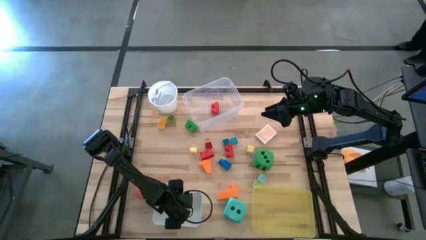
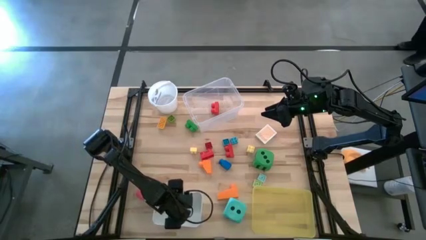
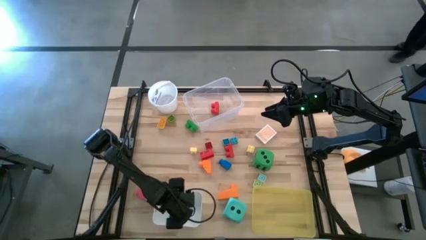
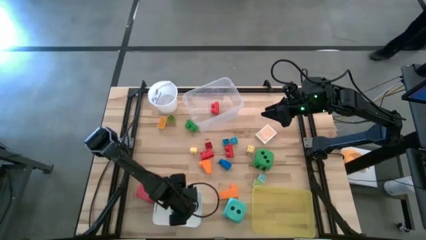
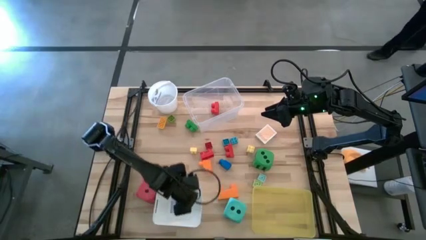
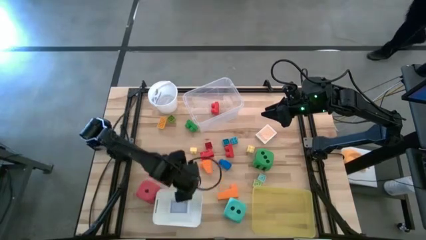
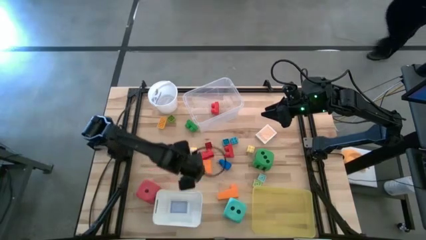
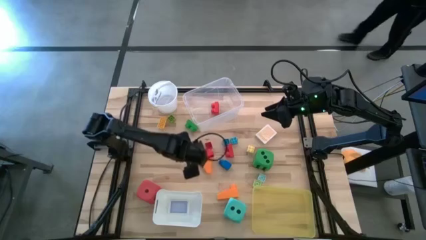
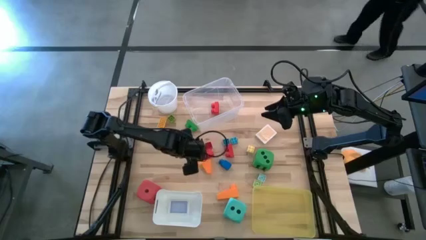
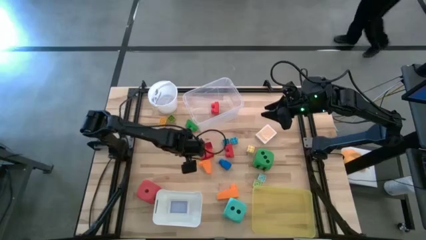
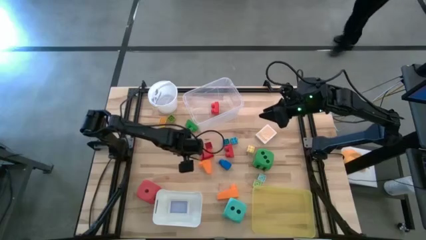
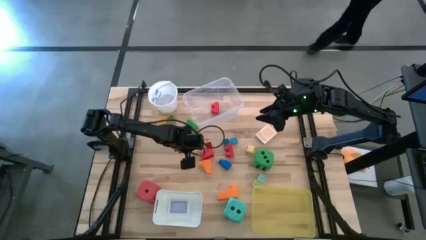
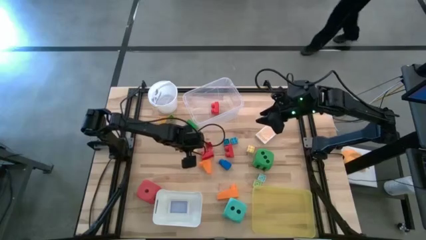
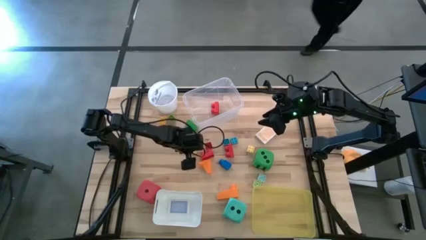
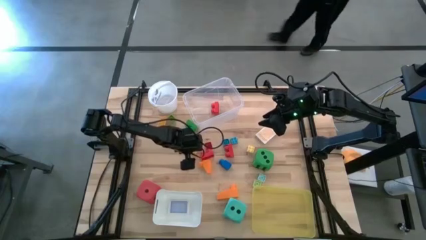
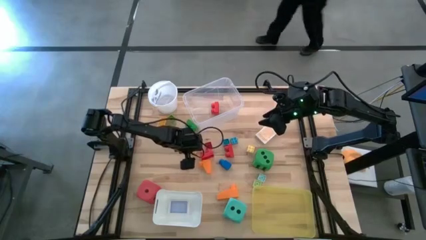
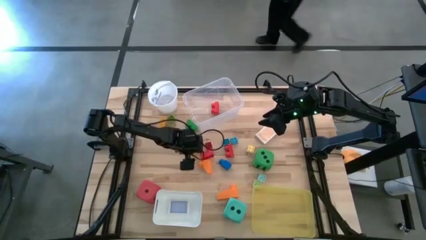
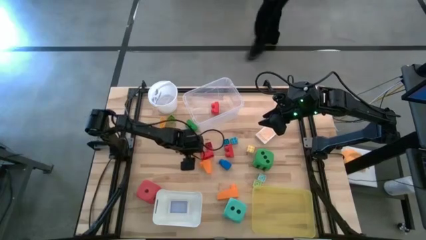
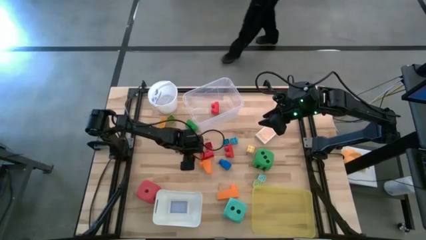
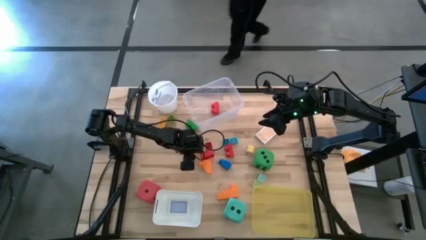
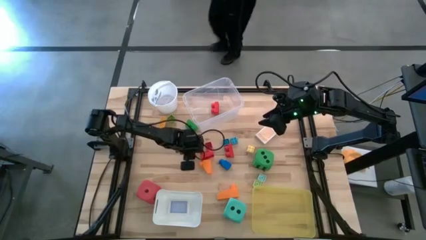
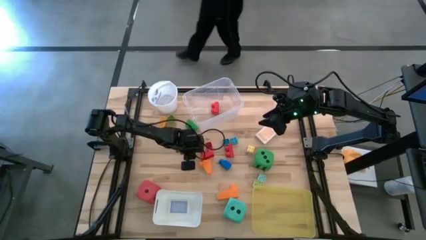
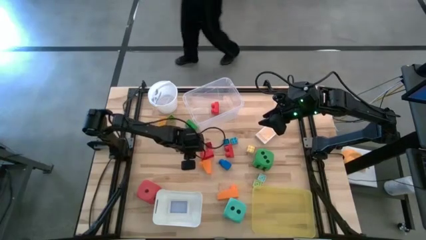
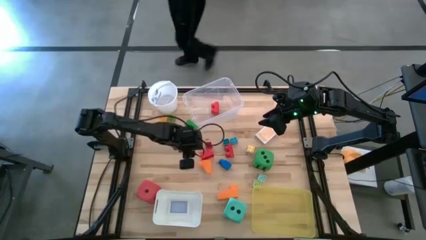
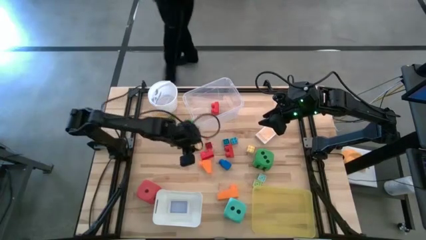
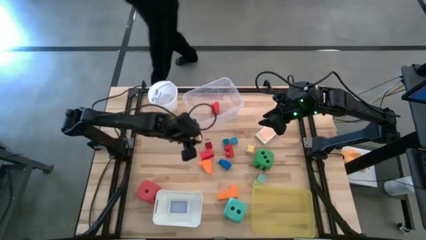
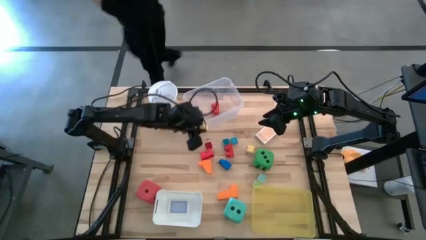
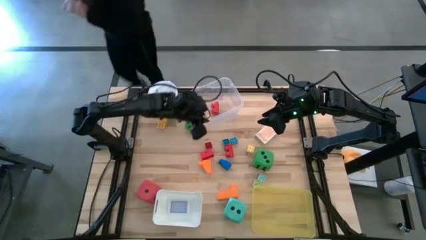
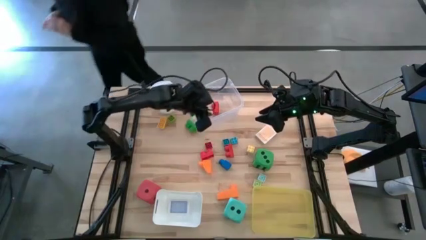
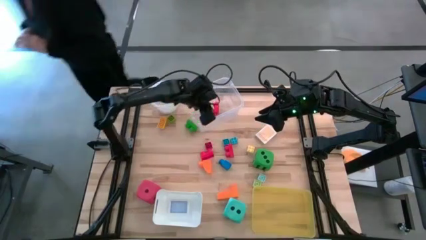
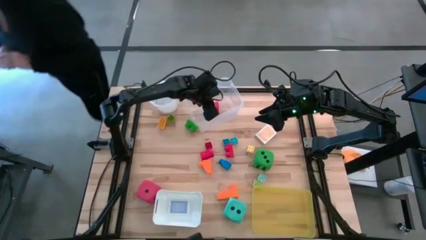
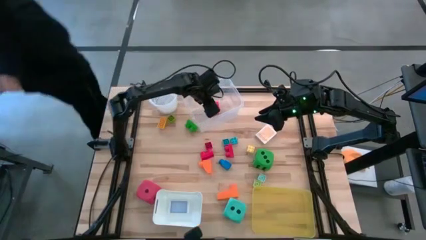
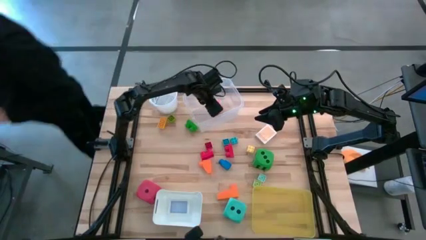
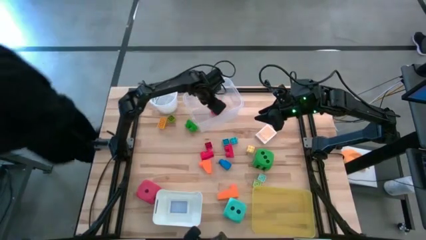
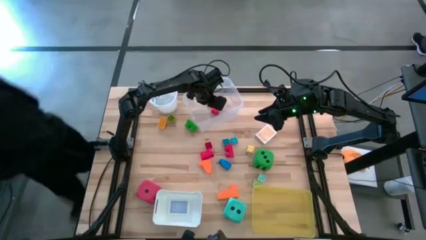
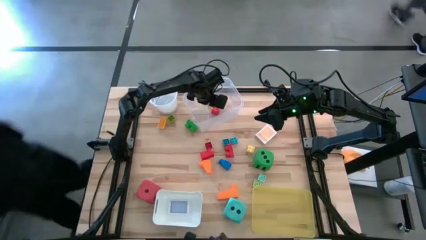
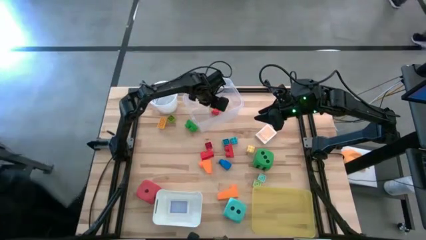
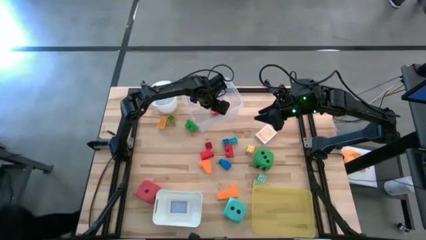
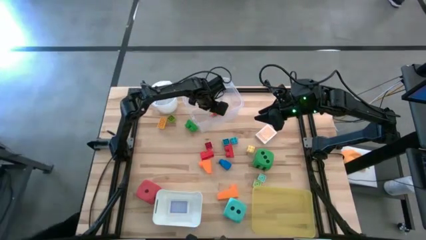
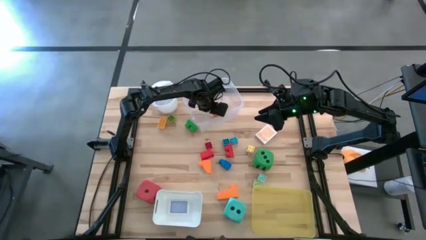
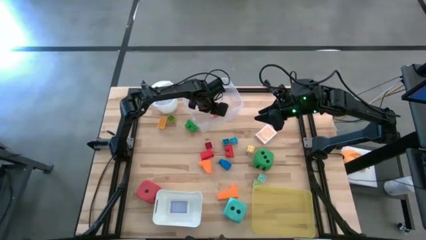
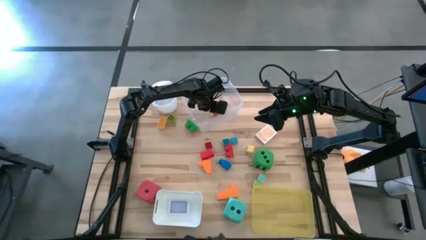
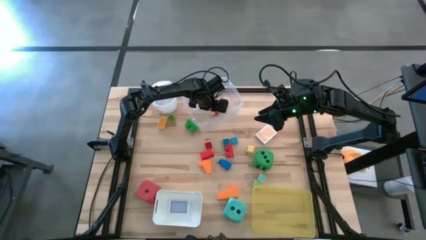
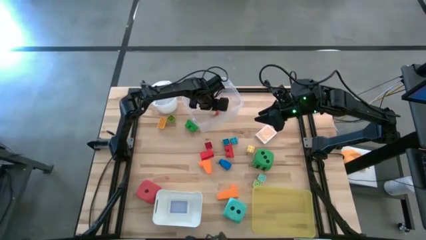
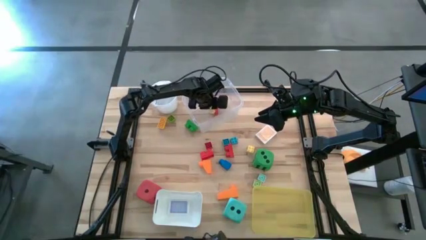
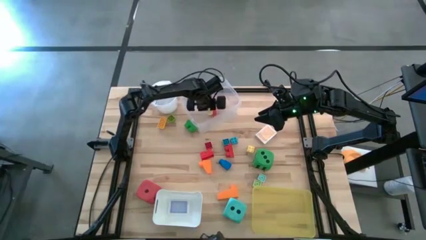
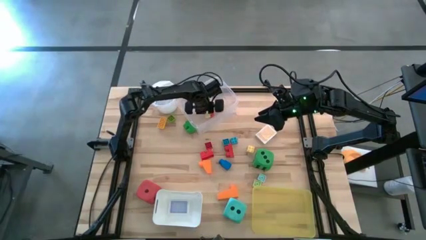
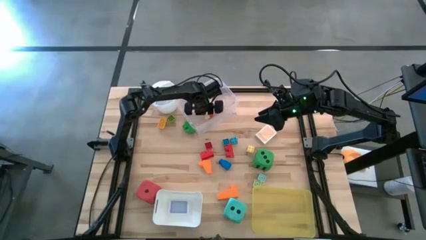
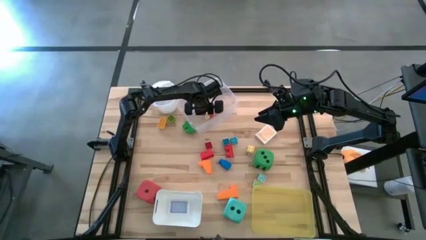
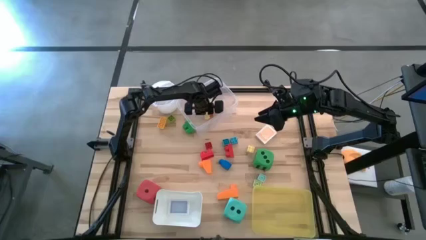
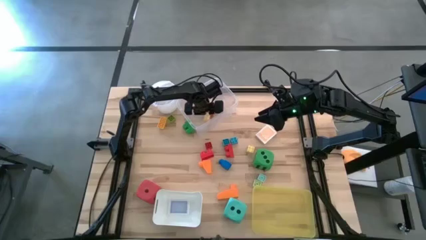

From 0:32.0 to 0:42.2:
Task: Pick & Place Toys
Put the yellow game piece into the transparent bin
